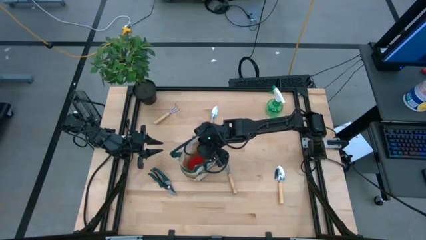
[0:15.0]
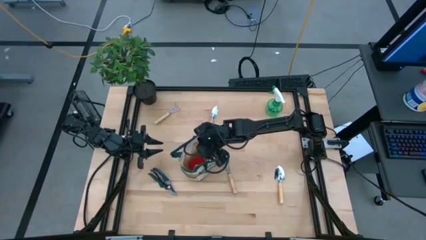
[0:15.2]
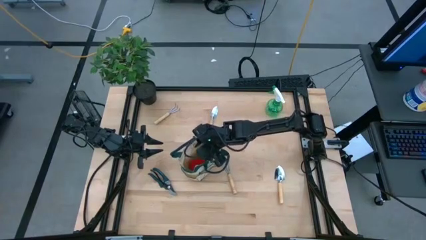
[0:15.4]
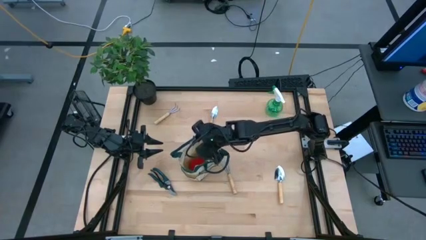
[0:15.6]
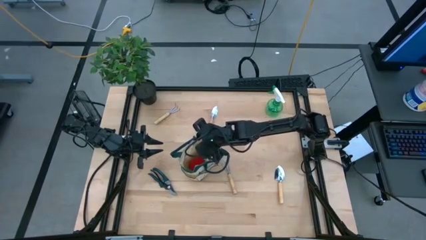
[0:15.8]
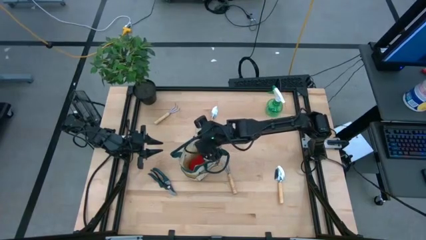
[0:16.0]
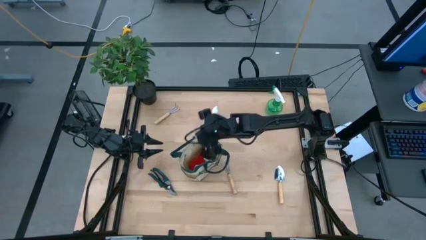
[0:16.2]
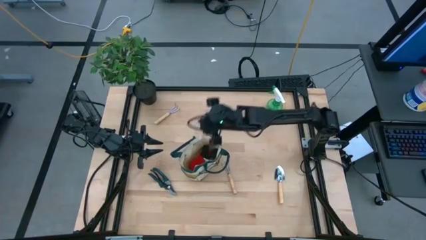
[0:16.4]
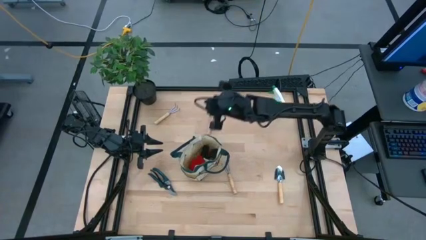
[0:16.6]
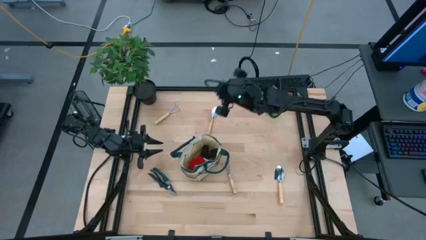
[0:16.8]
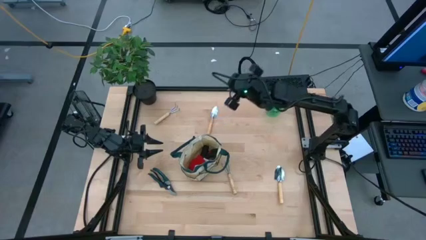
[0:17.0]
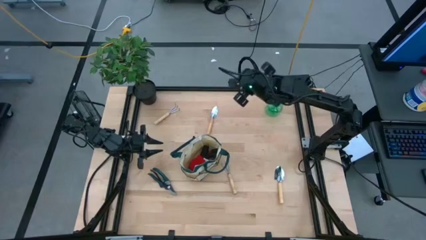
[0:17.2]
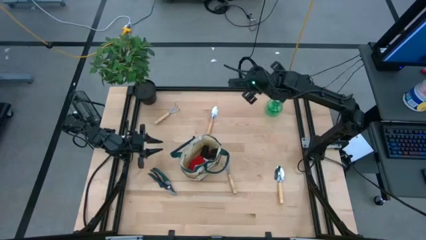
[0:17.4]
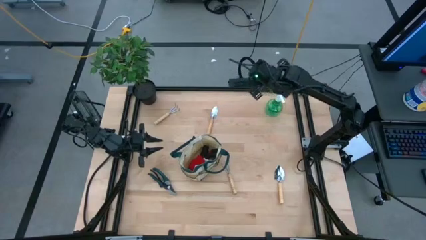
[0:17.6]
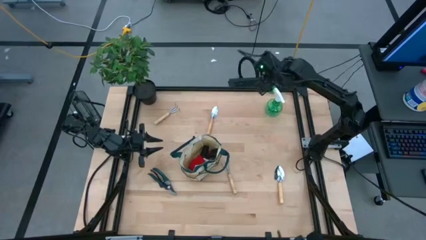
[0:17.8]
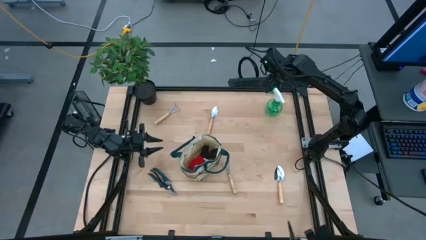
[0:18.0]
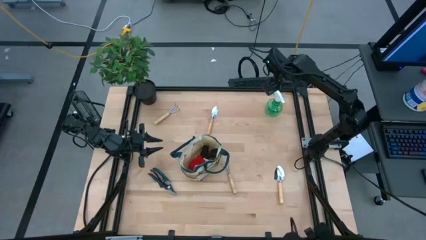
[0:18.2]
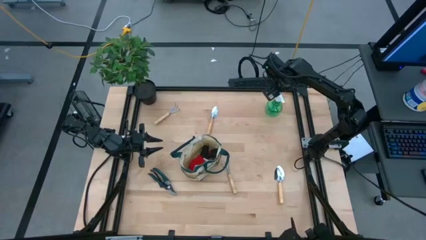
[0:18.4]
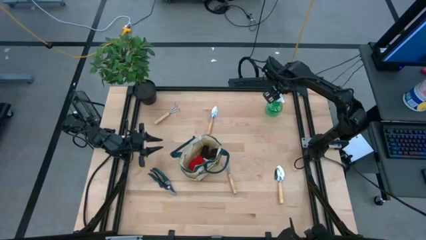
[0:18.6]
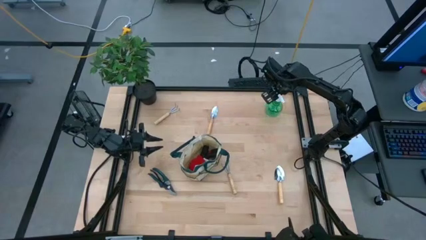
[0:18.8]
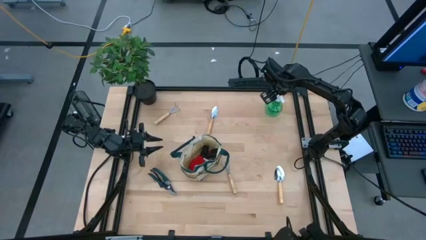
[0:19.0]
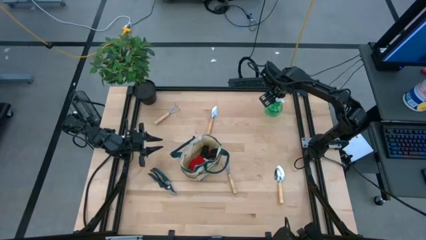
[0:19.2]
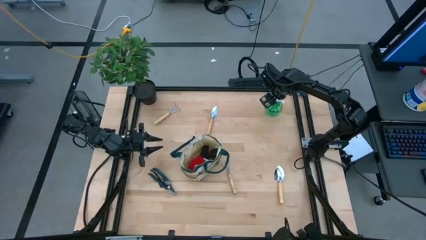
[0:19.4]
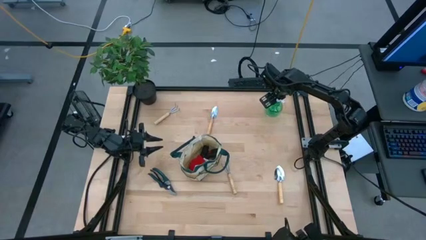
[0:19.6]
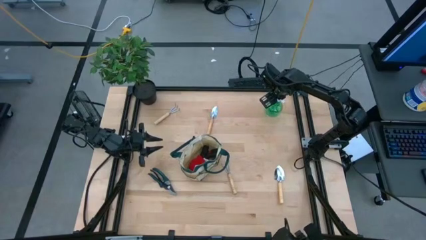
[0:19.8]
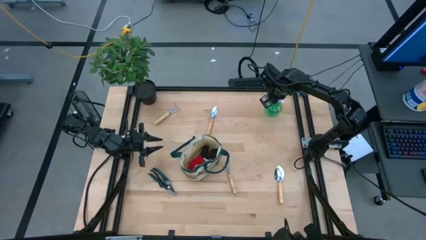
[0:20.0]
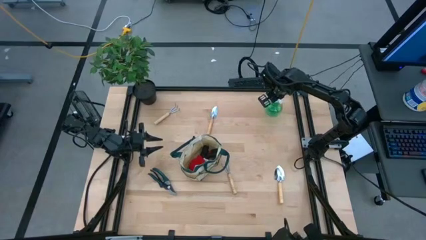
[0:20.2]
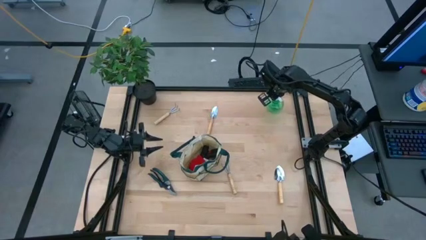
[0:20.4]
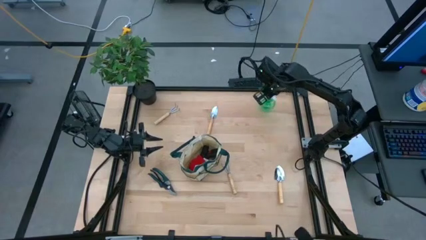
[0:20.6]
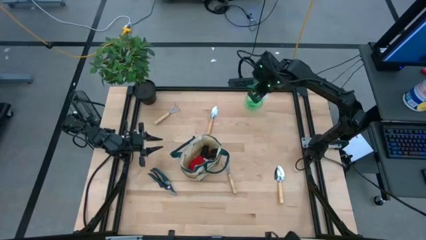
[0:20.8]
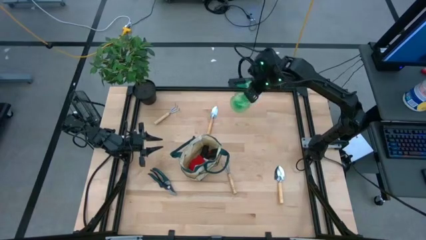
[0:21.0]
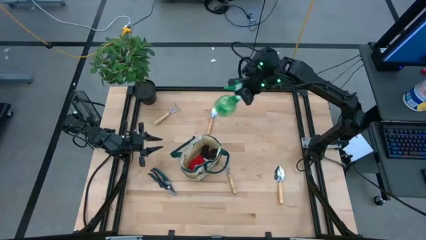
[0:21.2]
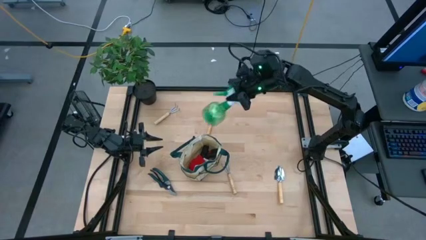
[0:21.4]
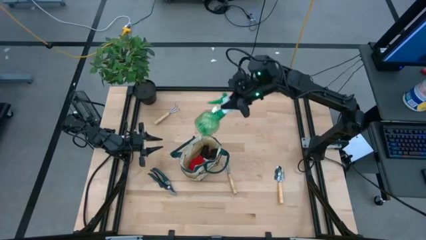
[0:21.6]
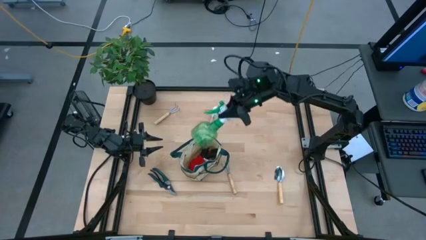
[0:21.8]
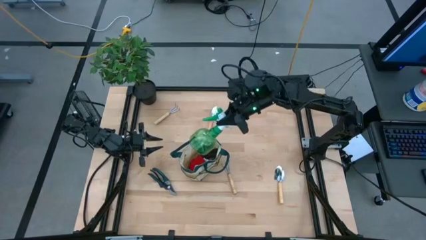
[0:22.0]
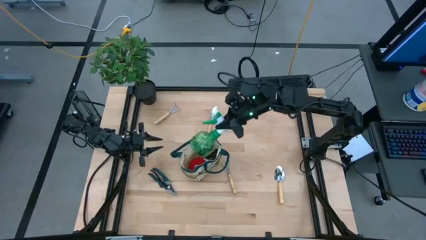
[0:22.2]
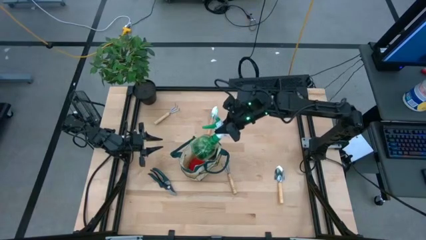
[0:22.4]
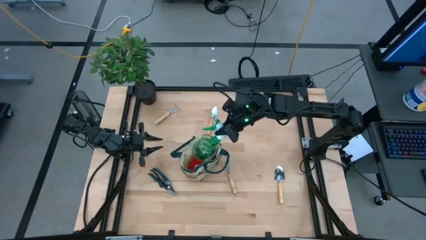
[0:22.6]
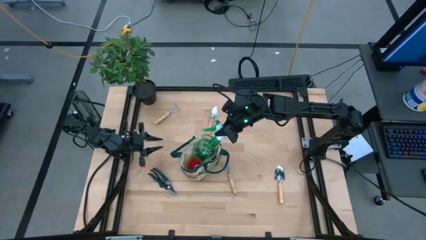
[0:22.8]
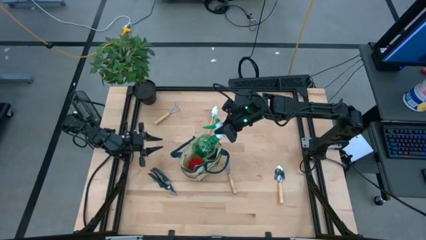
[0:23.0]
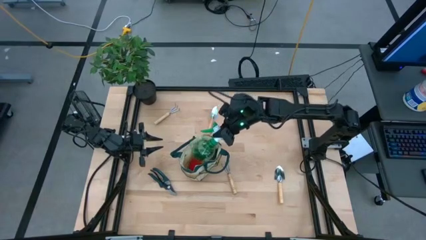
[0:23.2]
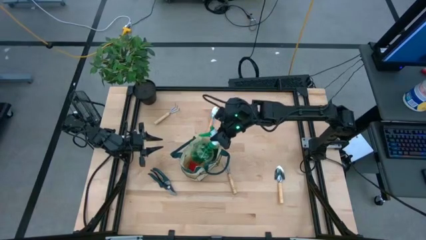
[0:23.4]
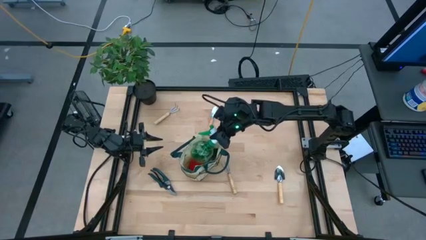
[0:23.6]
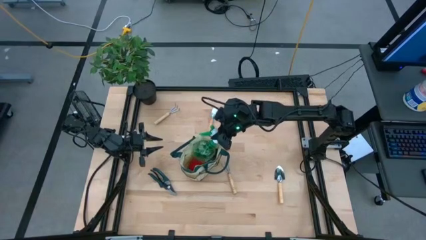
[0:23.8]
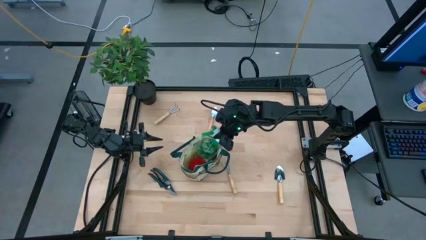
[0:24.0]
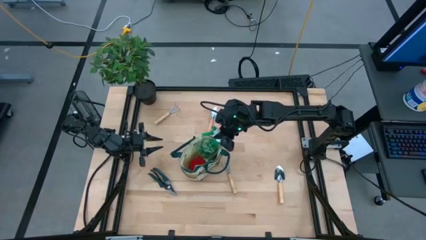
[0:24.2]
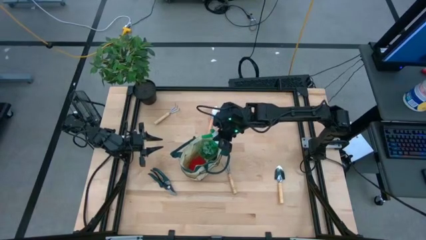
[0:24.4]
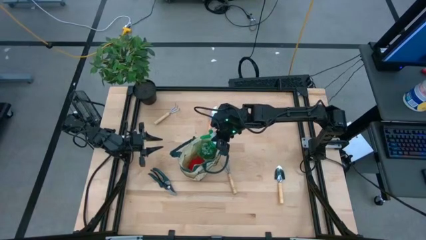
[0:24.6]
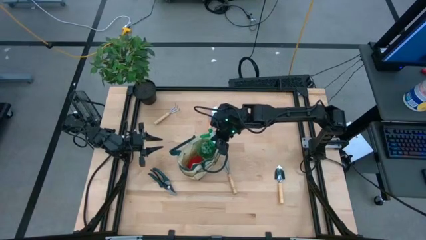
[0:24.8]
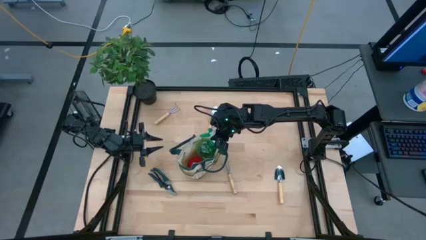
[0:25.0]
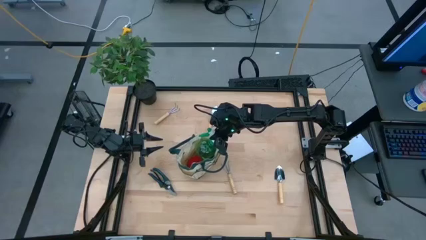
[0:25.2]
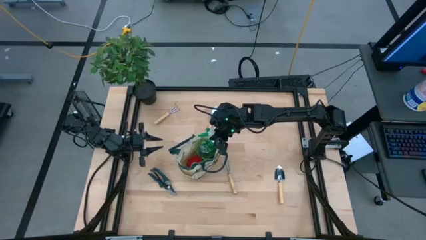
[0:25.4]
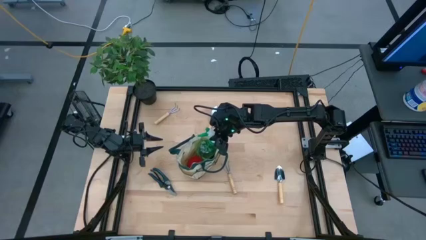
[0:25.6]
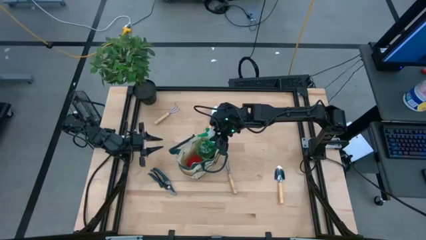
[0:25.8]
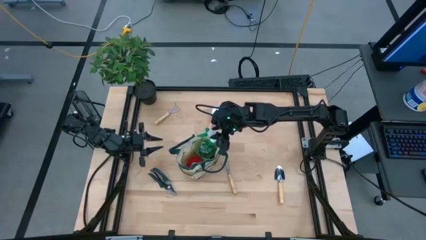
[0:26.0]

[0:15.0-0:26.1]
Task: Pick & Place Garden tools in Gardening bag
Put the green spray bottle into the brown bag

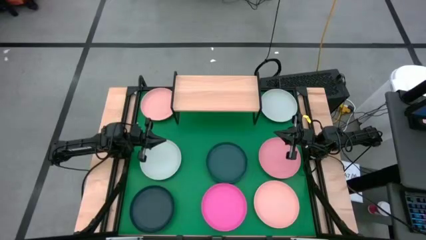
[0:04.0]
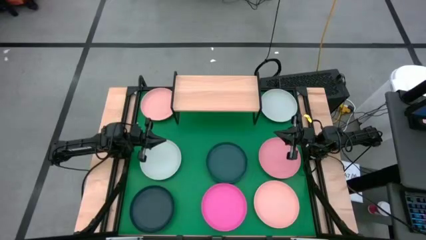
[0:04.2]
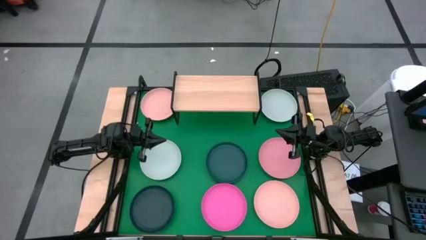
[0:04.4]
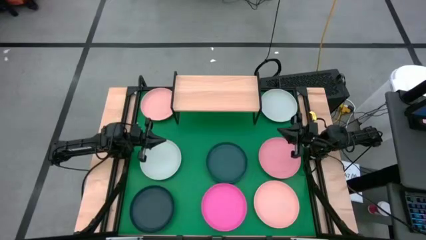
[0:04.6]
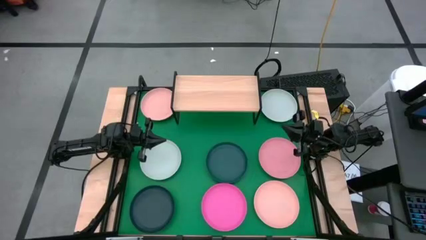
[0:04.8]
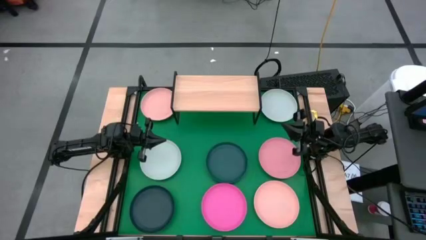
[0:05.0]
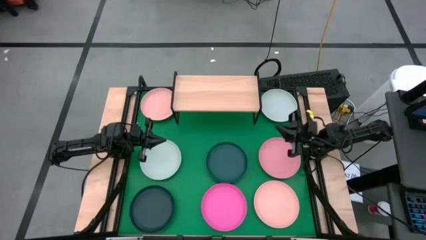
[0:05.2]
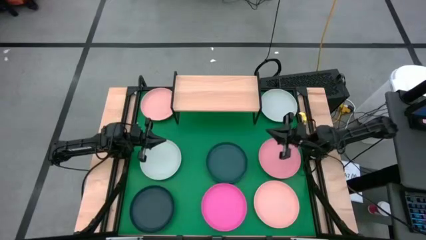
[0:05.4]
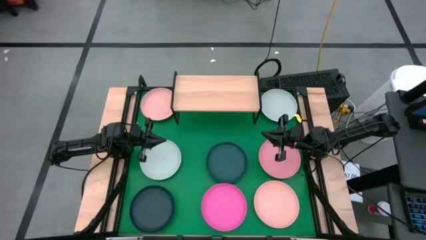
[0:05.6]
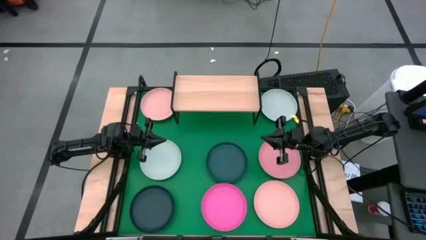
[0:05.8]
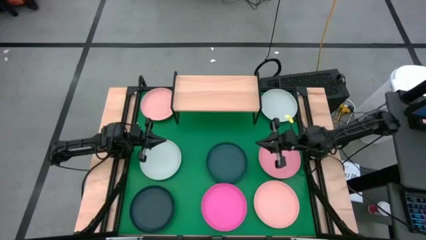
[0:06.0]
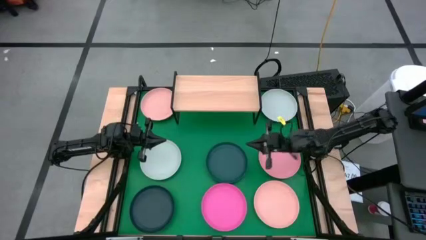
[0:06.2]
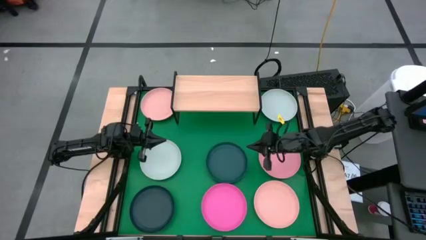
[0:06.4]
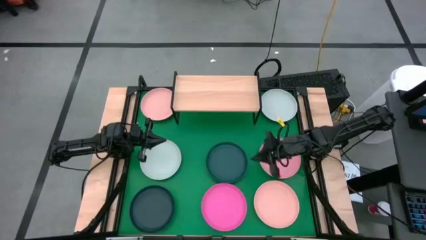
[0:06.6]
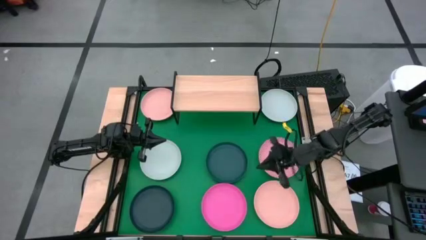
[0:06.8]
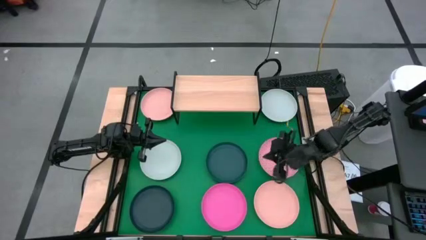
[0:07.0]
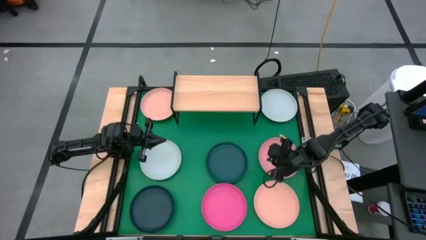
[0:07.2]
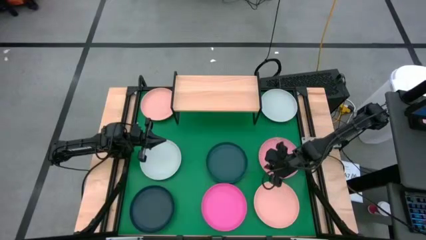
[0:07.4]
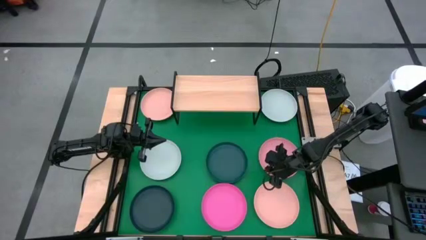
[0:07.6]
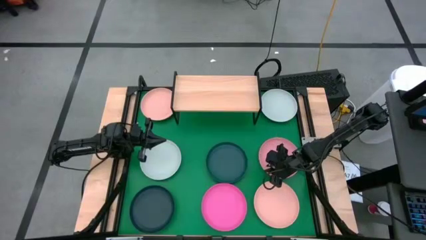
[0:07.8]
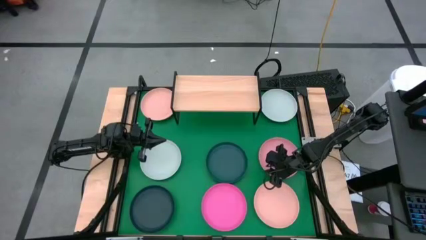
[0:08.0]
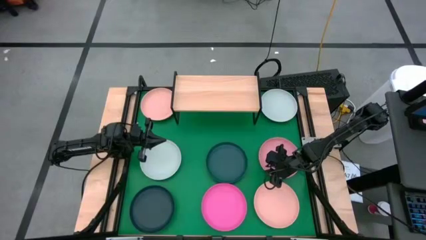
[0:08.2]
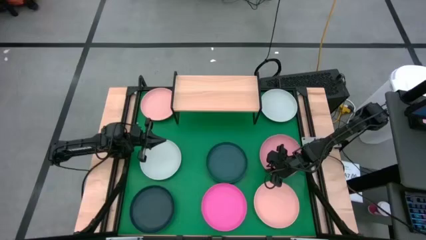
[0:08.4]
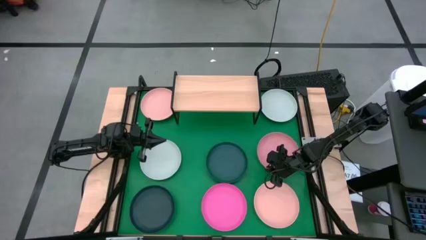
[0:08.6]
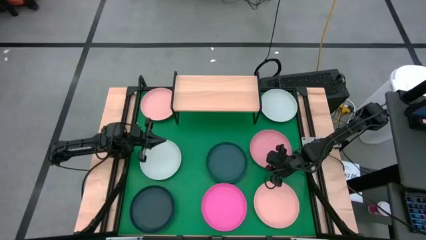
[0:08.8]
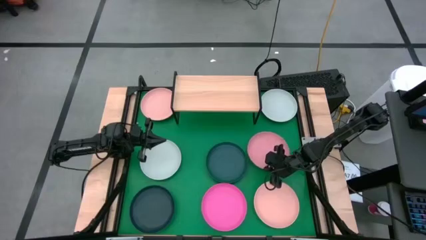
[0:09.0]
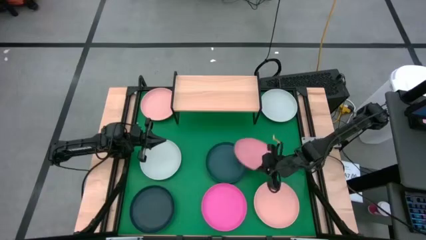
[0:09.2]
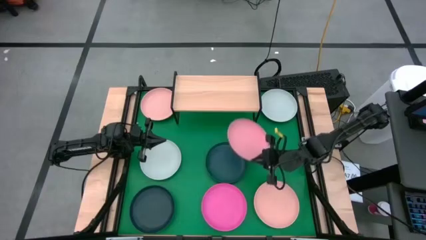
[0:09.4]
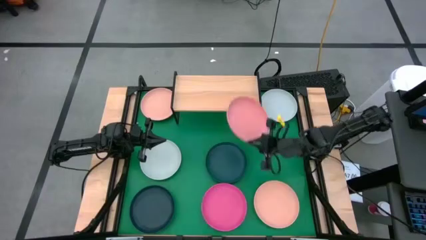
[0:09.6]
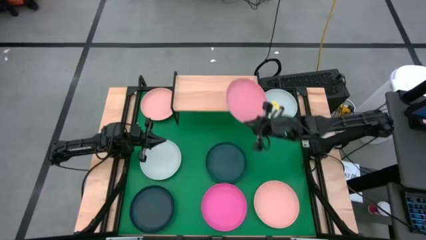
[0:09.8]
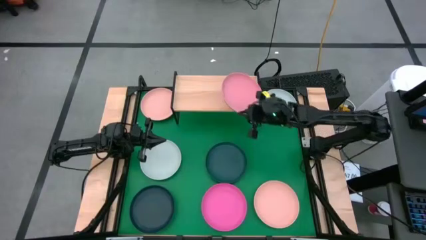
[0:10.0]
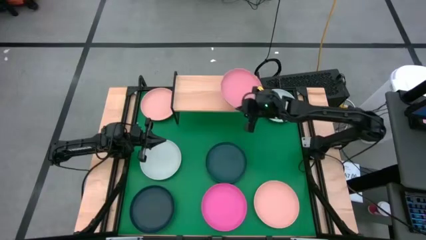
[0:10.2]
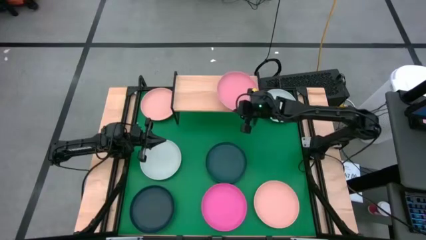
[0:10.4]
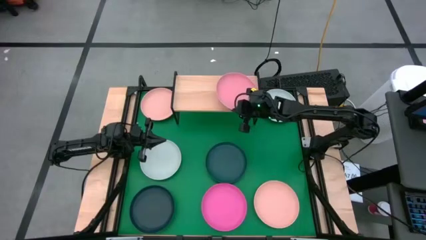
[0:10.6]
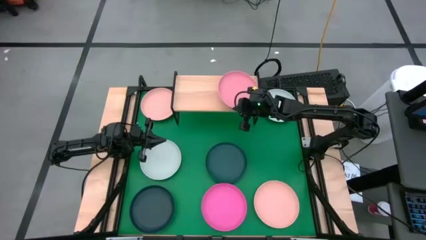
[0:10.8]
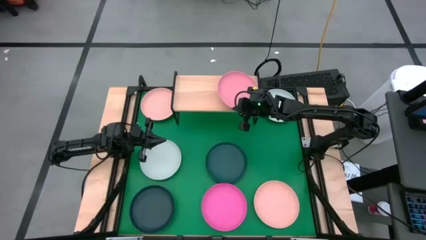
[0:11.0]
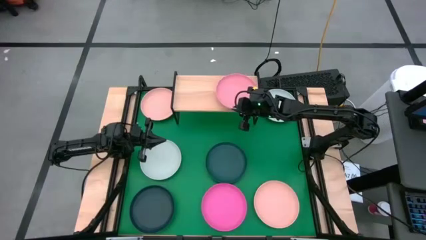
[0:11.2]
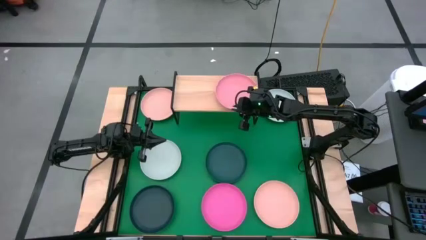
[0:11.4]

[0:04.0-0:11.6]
Task: Place and stack plates onto a shelf
Put the light pink plate on the shelf
